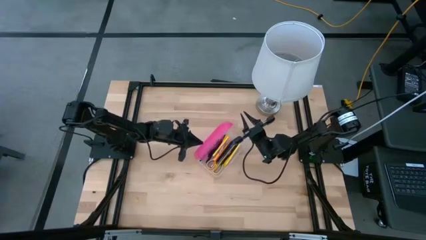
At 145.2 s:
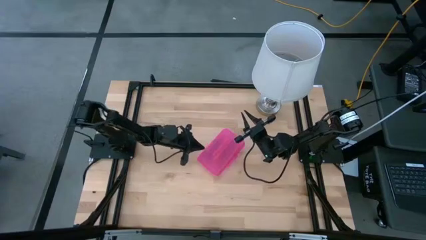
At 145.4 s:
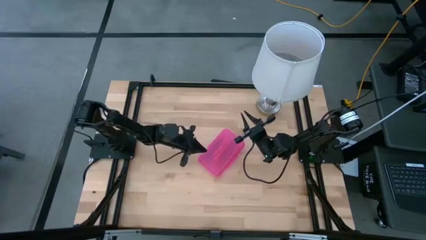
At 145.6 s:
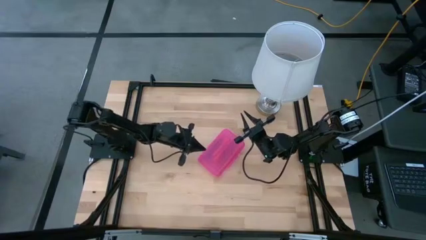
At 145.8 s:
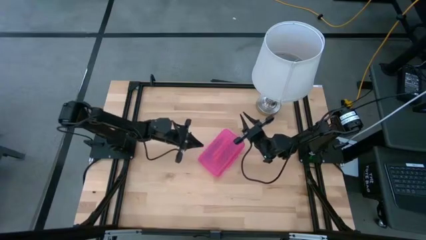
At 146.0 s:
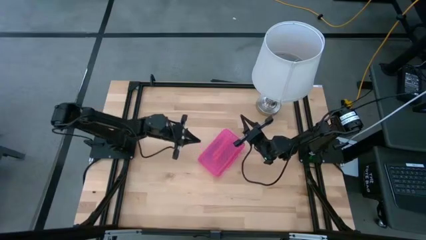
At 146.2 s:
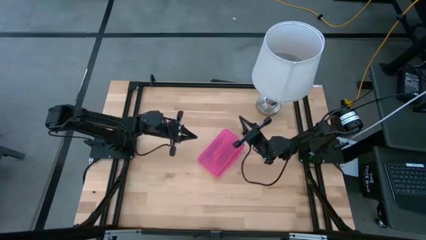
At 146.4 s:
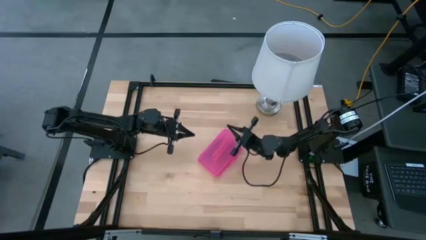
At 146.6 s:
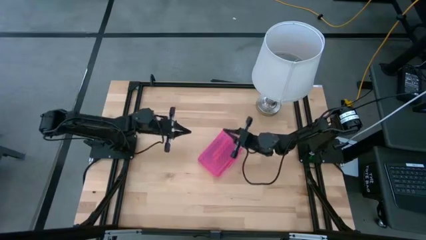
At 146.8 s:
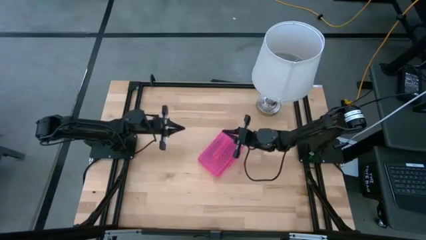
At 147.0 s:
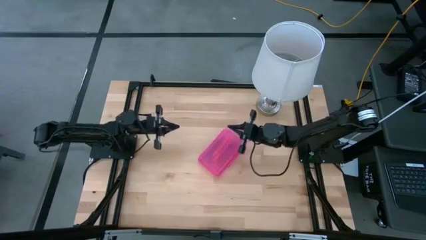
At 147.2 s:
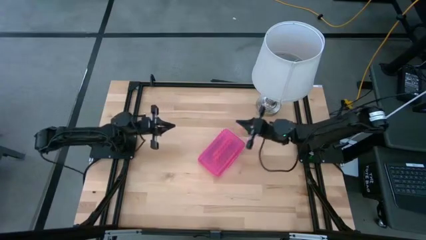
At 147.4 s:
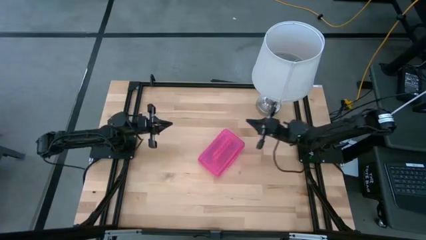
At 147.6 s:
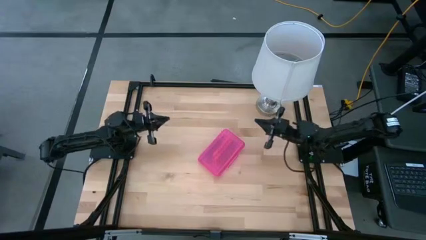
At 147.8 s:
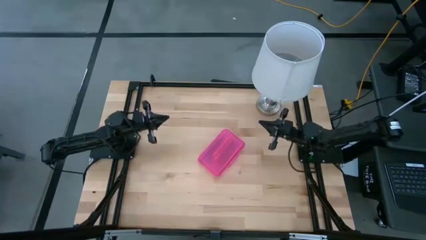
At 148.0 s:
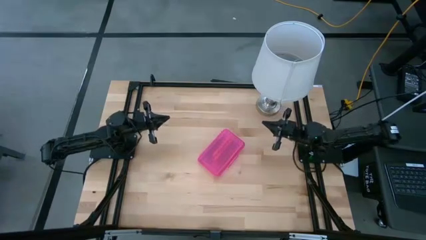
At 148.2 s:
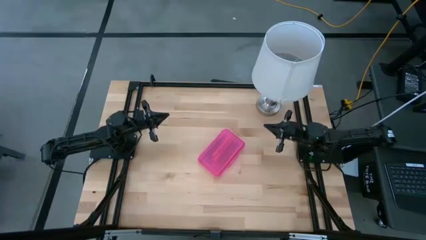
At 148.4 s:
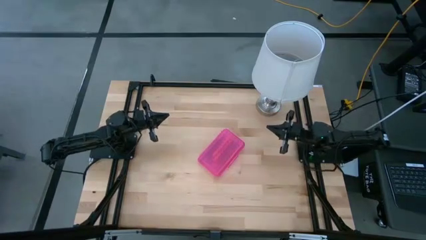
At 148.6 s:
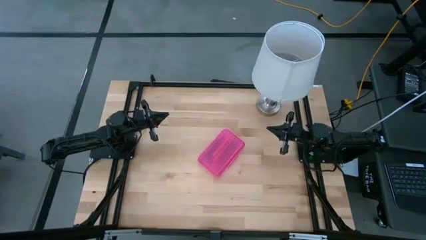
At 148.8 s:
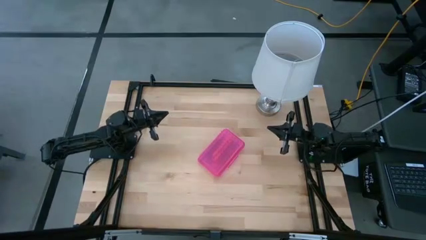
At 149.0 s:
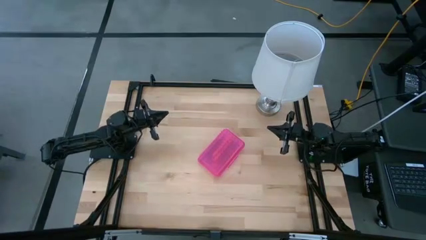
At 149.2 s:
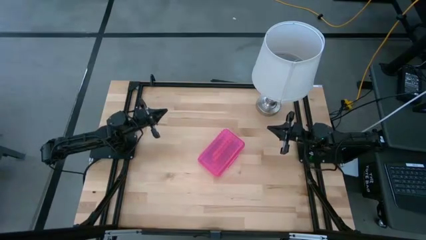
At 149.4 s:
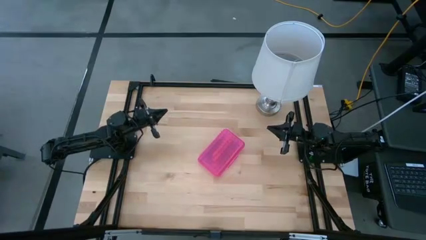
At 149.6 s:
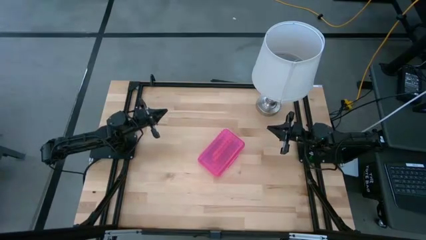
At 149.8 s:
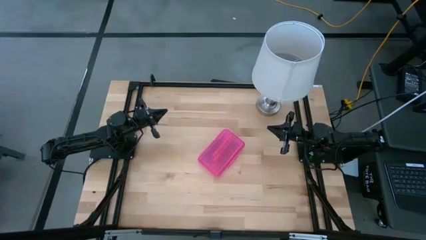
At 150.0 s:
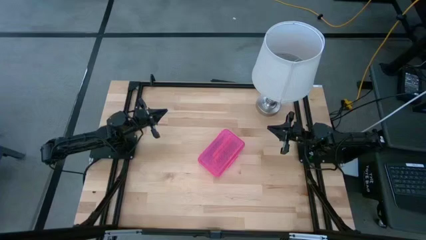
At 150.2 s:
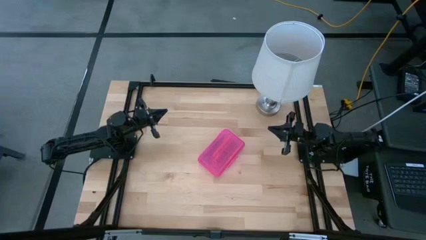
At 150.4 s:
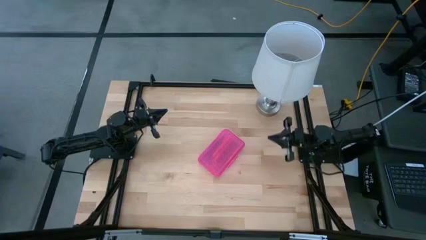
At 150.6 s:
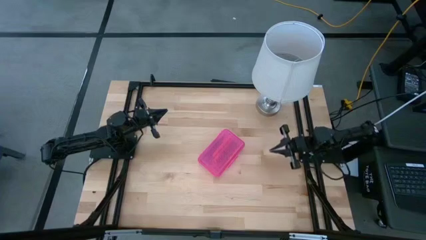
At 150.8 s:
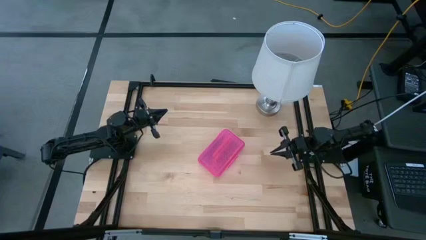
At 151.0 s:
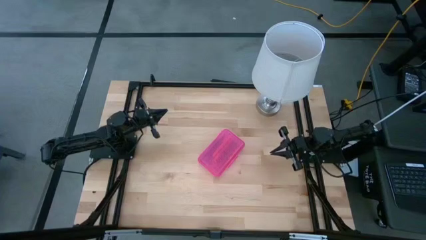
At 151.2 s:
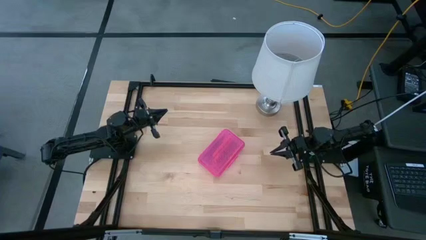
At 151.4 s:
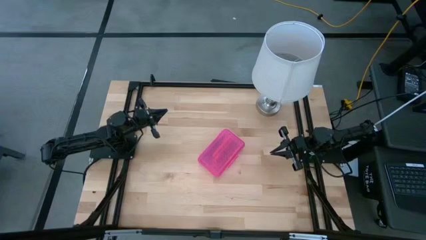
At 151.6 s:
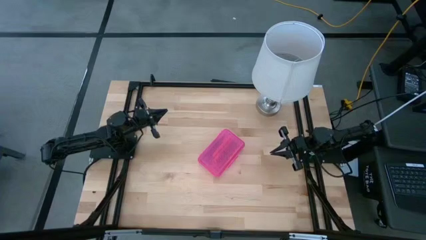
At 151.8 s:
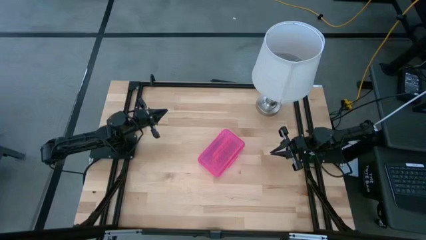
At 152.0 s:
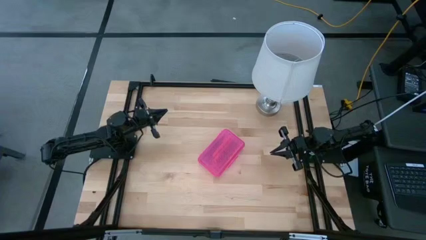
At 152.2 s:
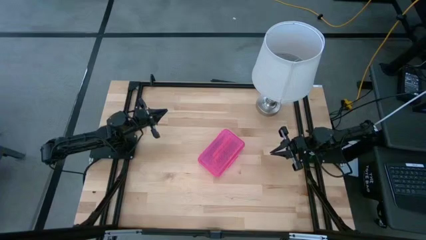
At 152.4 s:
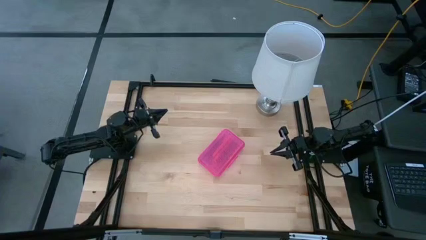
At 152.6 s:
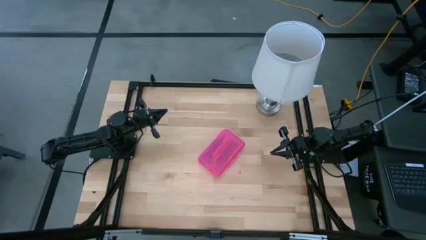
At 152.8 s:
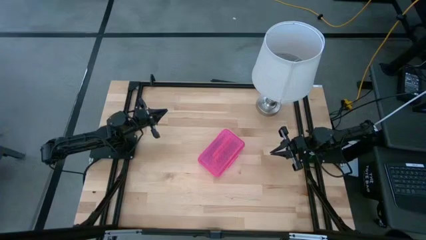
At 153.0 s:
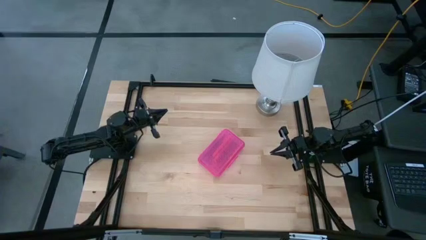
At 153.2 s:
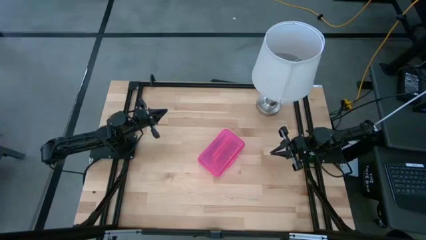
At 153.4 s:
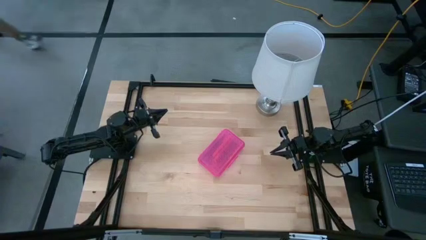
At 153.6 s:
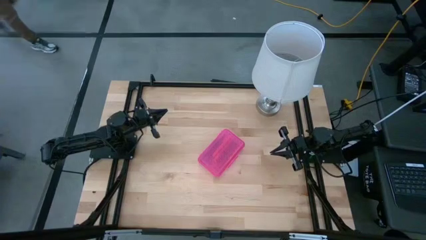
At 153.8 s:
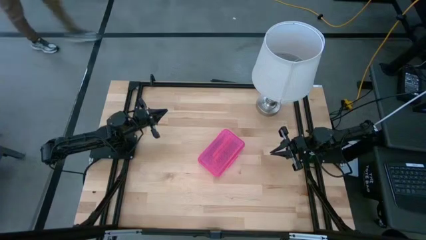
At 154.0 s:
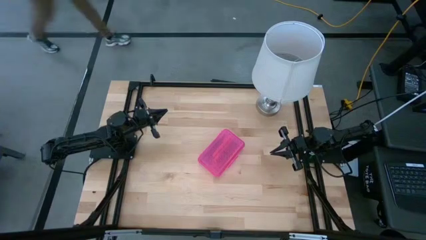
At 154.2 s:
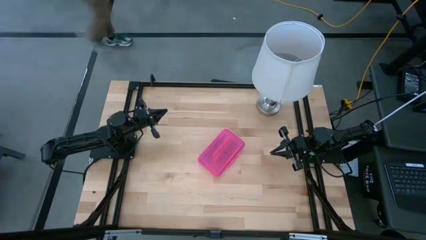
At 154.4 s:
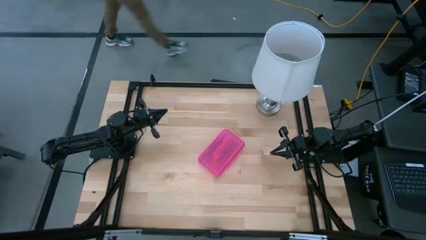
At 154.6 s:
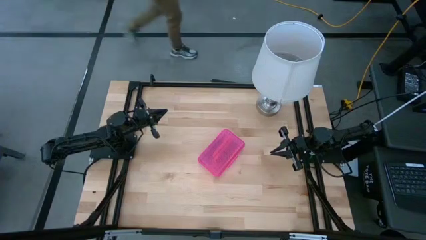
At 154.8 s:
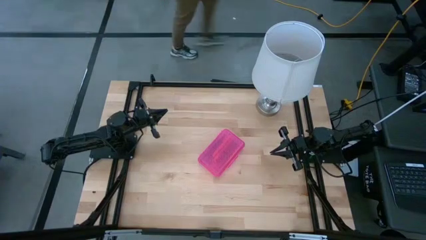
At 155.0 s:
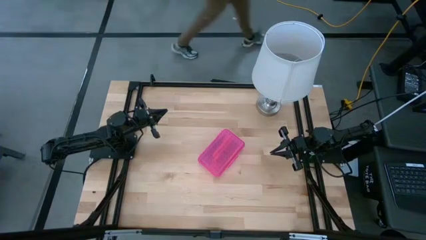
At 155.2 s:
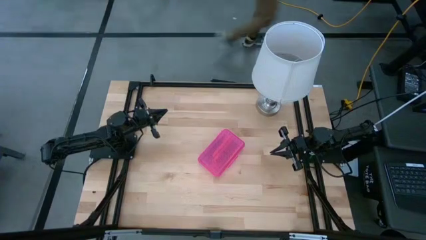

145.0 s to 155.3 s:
Task: Pick & place school supplies into a supply box
Return to Home Position

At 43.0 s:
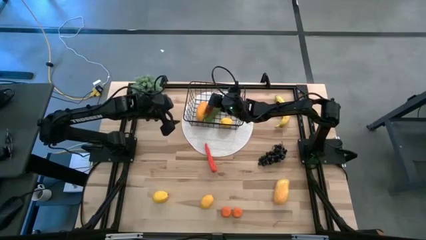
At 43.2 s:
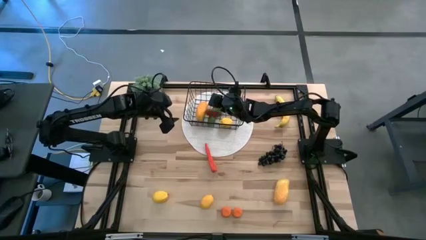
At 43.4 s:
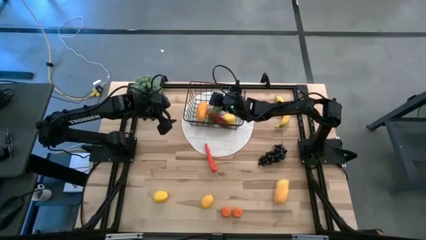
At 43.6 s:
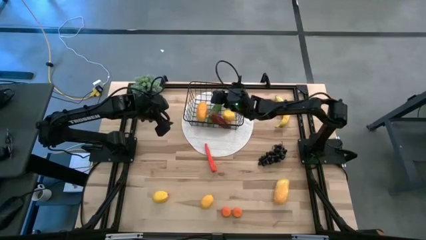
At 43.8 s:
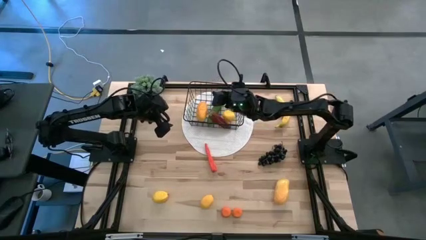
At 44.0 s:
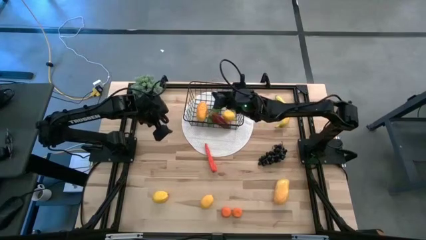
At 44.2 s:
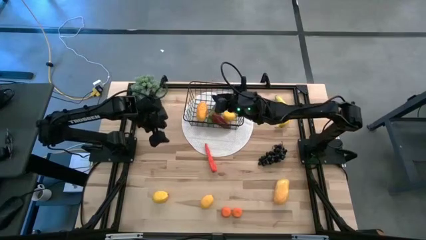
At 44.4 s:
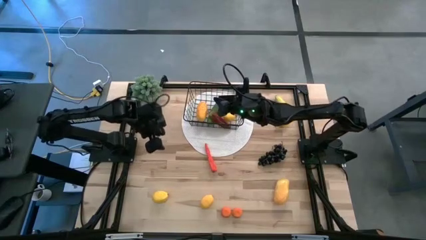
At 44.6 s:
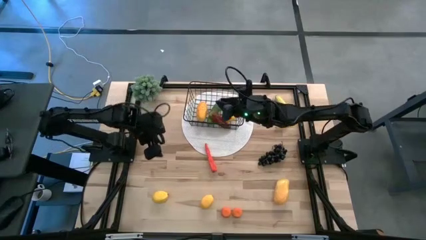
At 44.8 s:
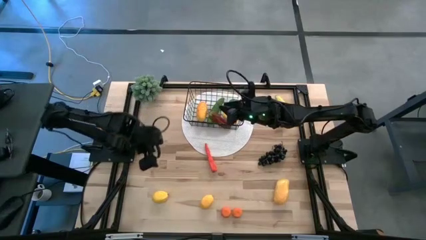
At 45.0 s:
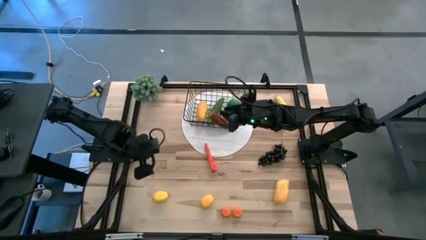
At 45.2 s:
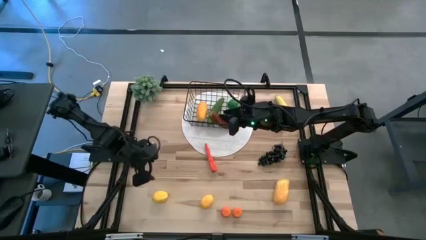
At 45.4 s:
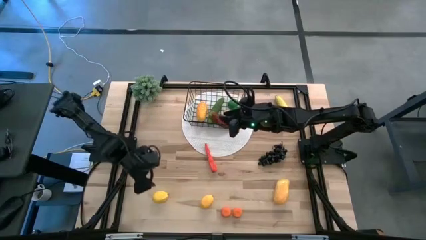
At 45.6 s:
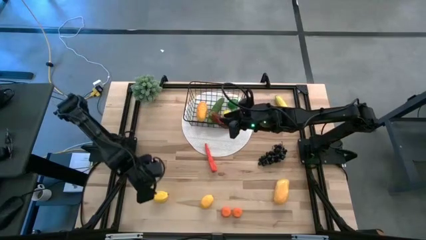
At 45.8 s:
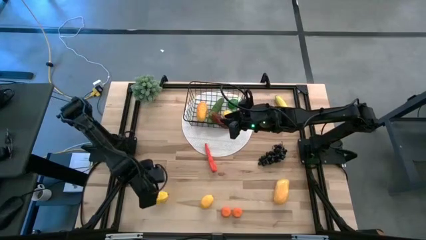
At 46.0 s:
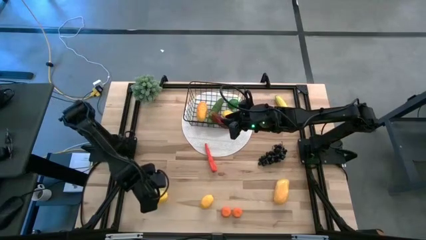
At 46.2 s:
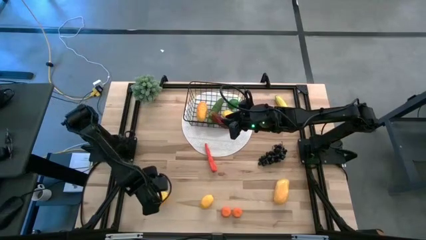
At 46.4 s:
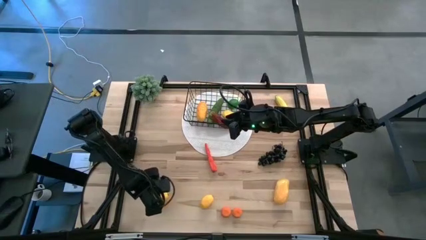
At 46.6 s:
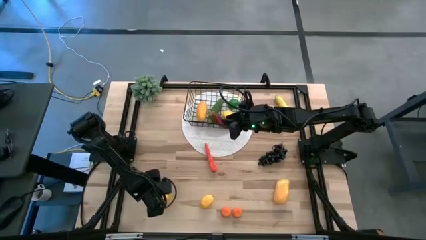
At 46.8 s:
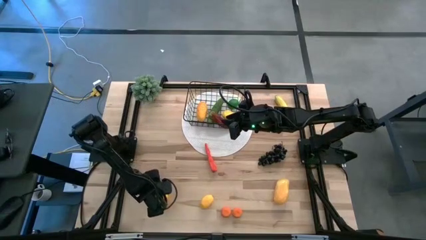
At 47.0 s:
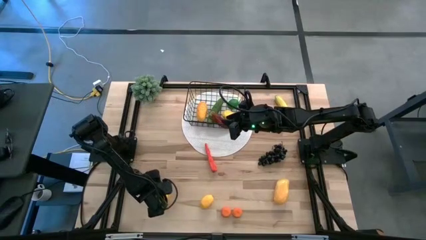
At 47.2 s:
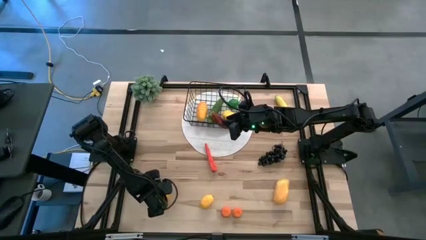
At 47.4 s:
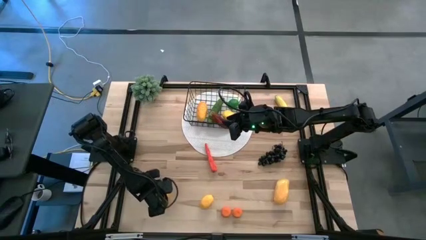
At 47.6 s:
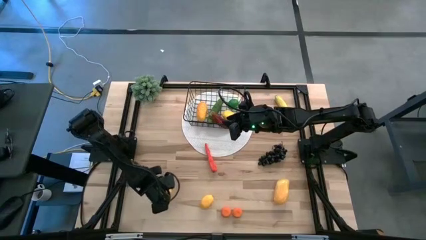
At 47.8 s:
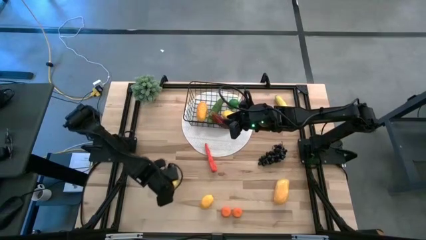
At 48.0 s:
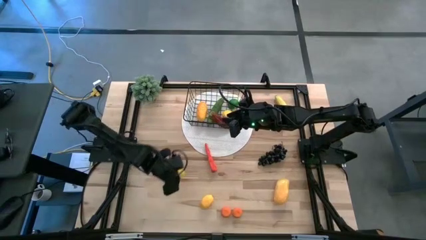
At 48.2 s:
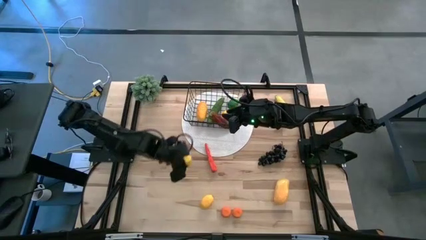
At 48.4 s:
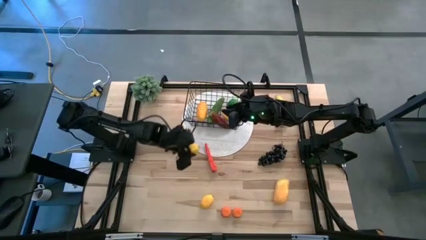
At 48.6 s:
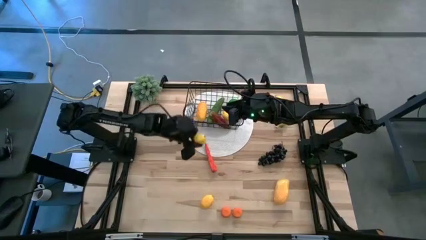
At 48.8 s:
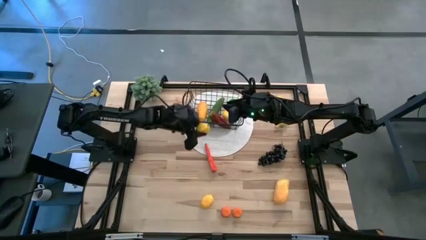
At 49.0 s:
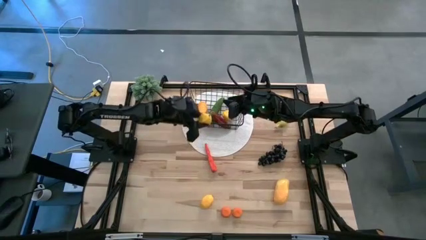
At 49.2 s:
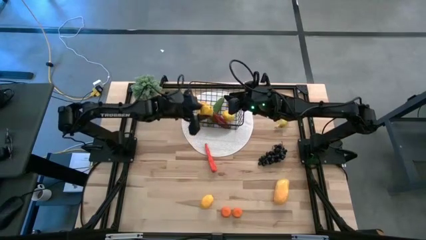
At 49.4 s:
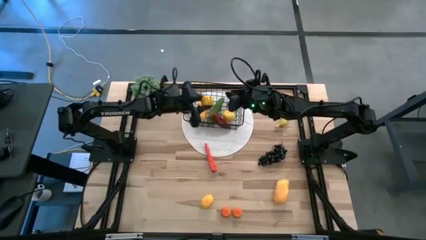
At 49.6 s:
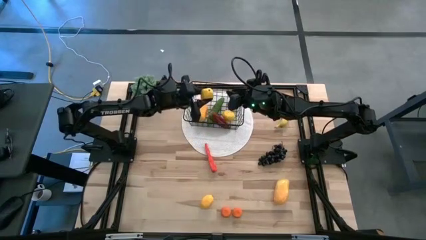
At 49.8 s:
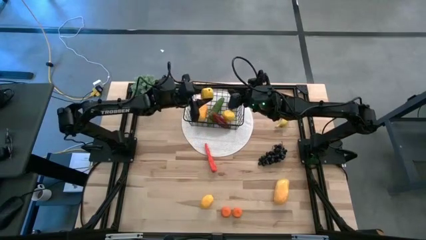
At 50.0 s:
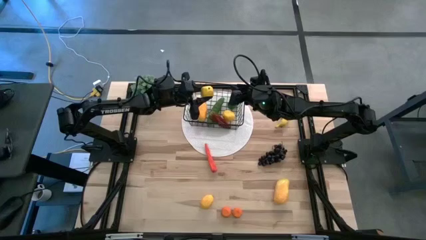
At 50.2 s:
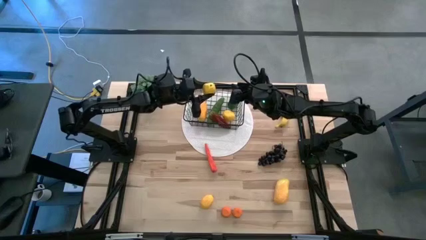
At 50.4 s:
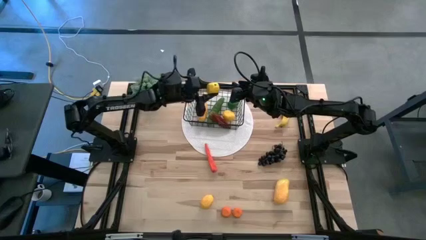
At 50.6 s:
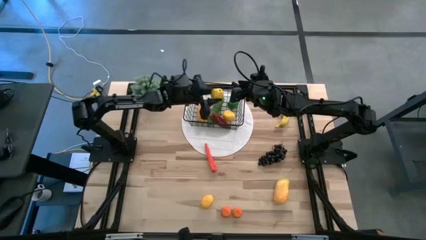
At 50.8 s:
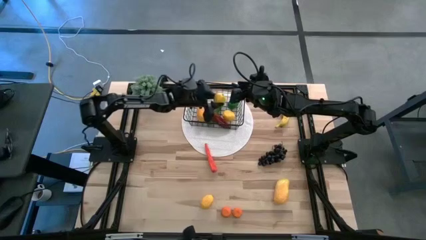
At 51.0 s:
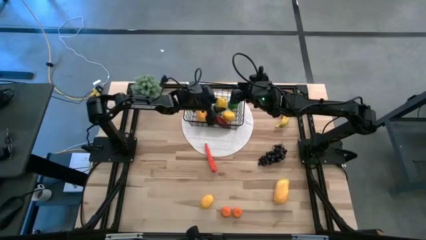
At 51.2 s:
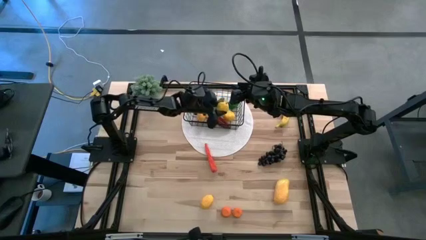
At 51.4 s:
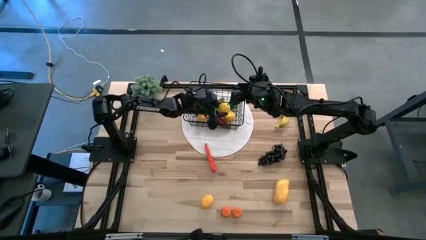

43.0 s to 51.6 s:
Task: Build produce basket
Put the left lemon into the wire basket
